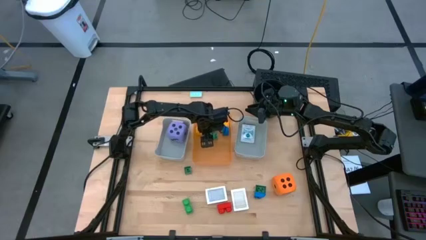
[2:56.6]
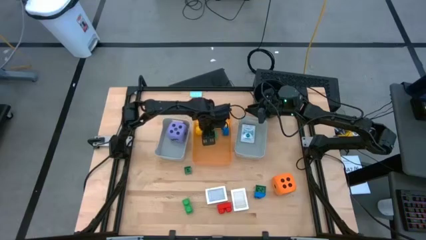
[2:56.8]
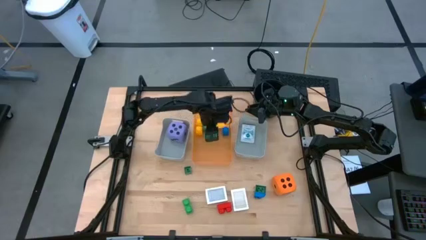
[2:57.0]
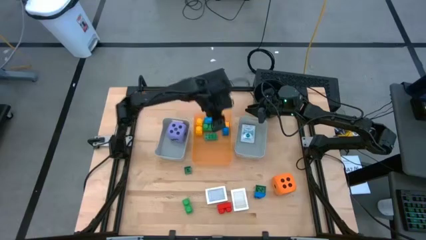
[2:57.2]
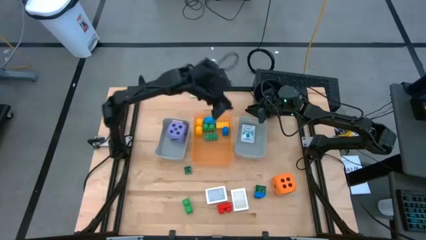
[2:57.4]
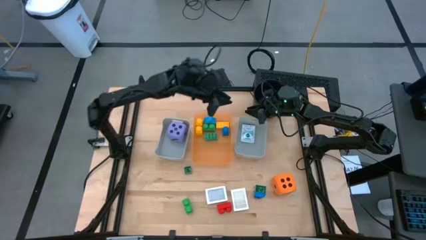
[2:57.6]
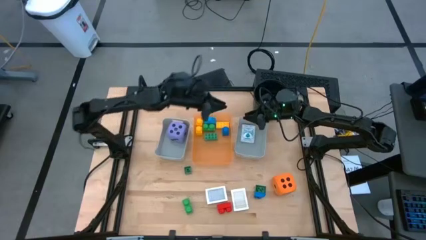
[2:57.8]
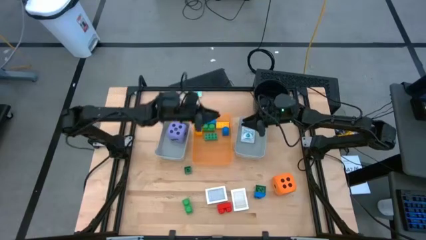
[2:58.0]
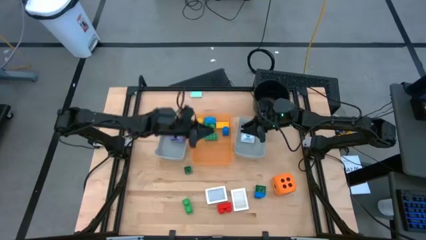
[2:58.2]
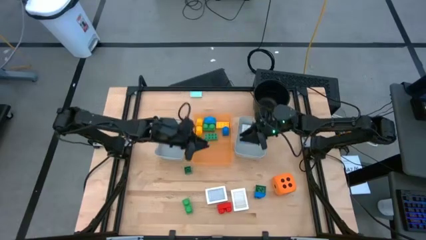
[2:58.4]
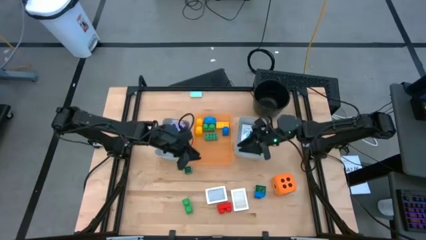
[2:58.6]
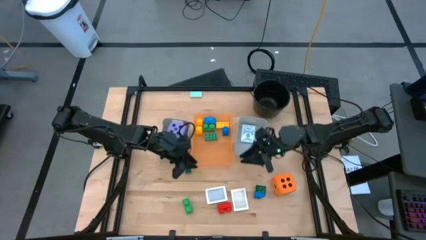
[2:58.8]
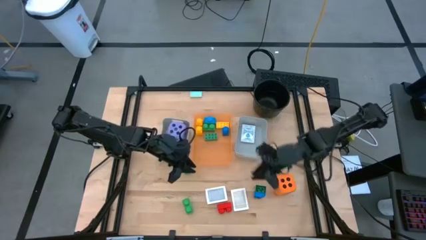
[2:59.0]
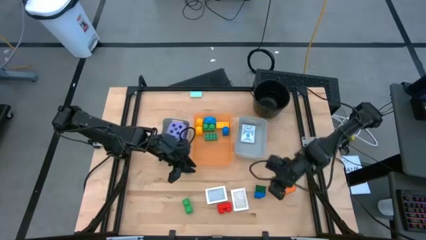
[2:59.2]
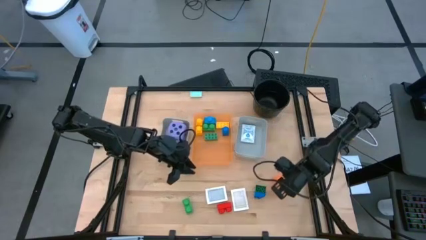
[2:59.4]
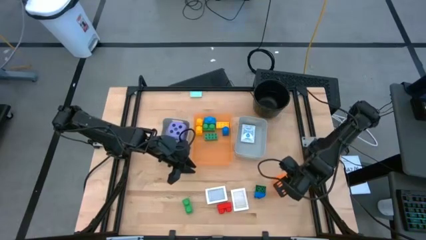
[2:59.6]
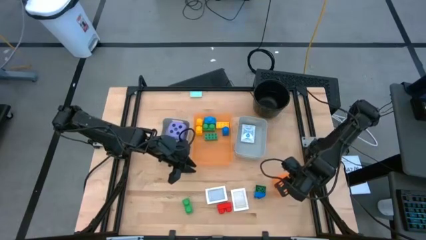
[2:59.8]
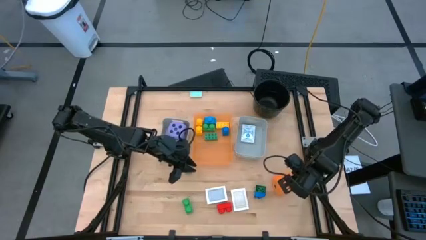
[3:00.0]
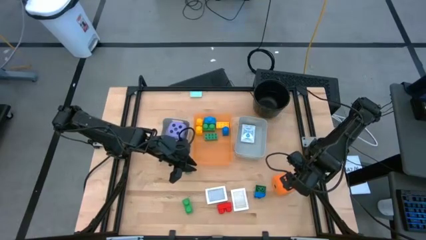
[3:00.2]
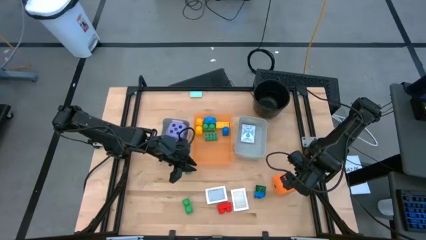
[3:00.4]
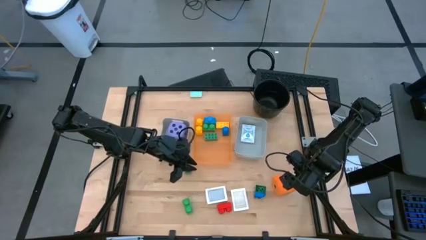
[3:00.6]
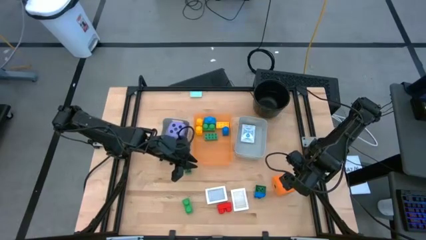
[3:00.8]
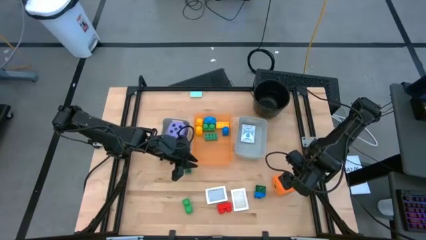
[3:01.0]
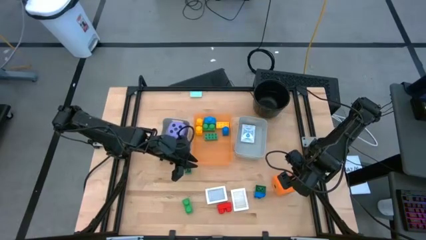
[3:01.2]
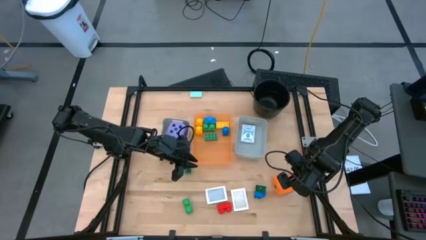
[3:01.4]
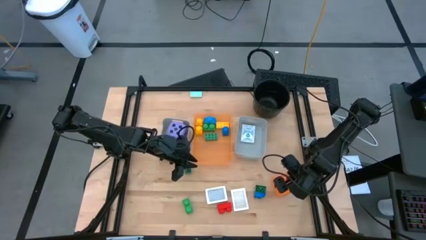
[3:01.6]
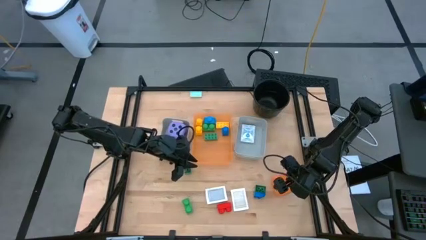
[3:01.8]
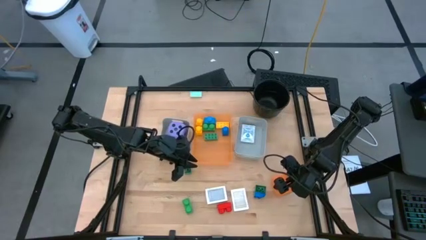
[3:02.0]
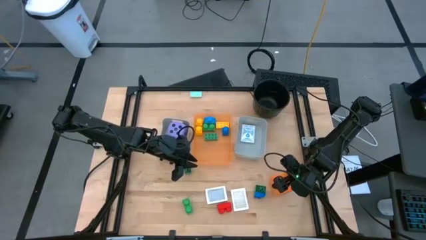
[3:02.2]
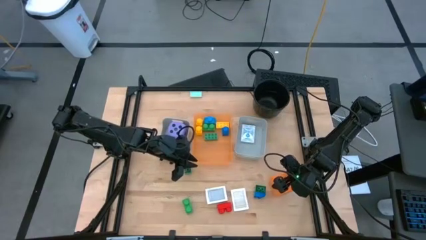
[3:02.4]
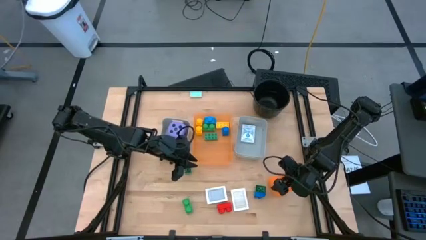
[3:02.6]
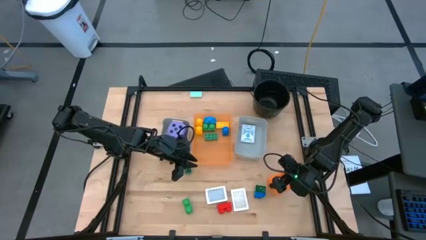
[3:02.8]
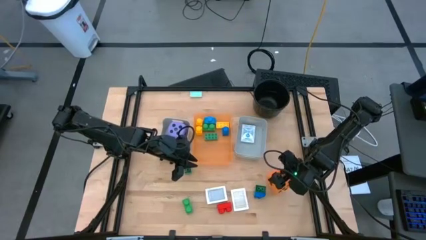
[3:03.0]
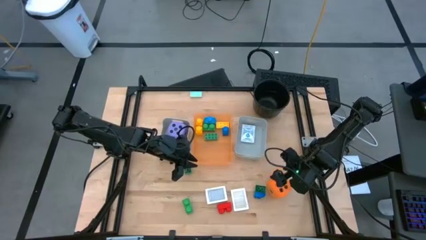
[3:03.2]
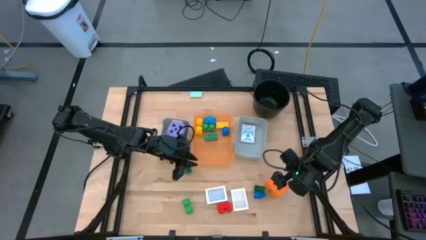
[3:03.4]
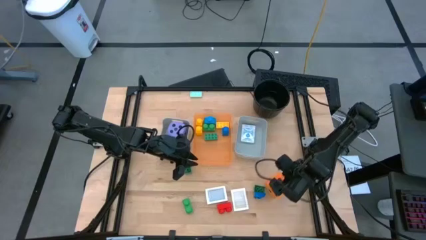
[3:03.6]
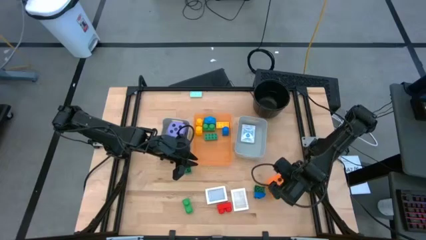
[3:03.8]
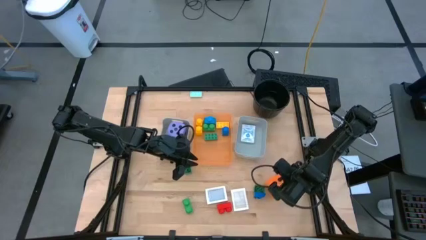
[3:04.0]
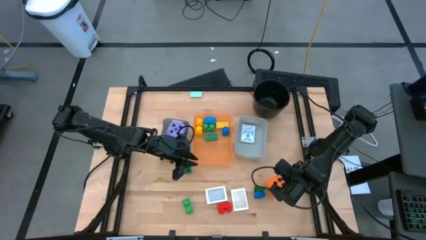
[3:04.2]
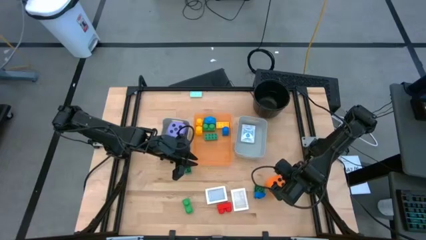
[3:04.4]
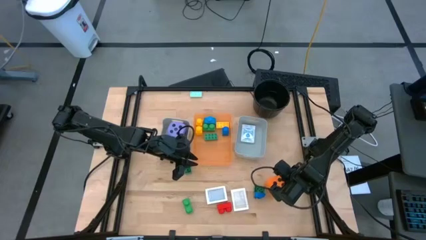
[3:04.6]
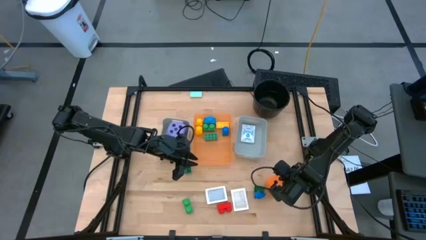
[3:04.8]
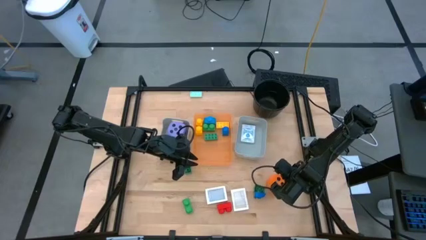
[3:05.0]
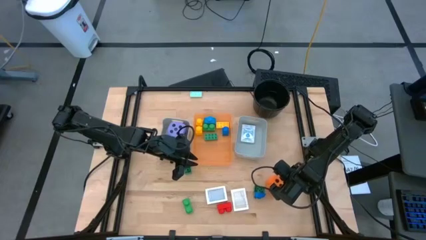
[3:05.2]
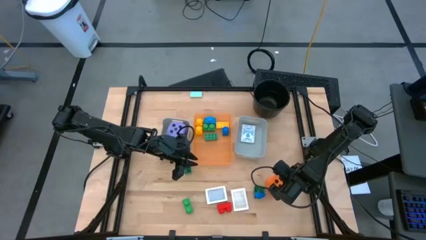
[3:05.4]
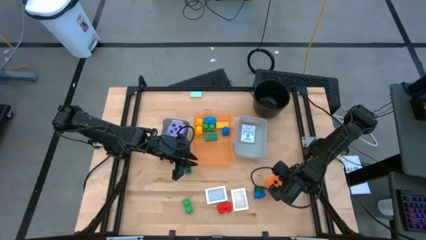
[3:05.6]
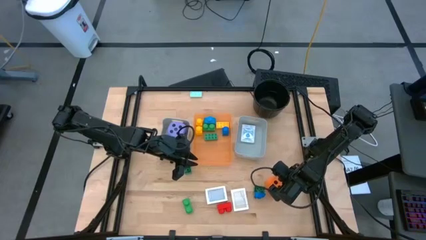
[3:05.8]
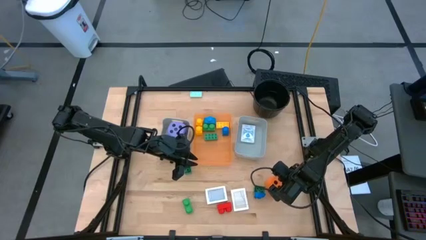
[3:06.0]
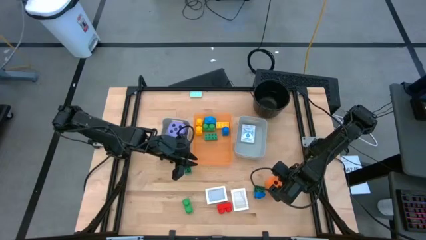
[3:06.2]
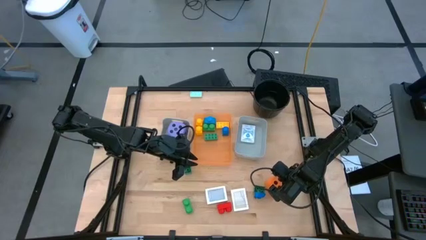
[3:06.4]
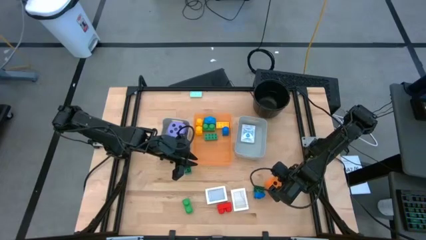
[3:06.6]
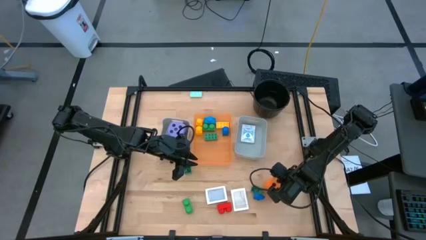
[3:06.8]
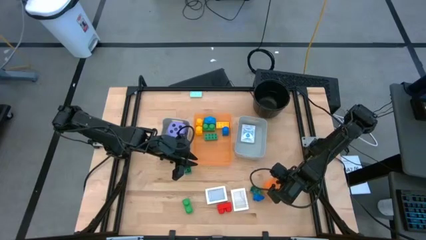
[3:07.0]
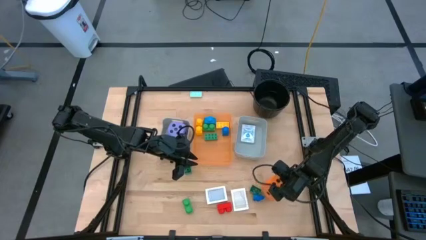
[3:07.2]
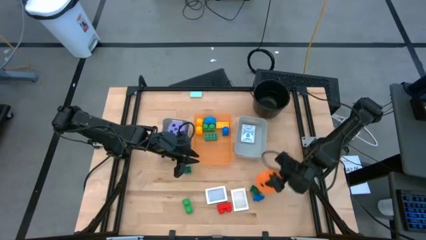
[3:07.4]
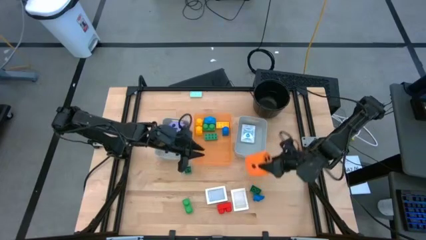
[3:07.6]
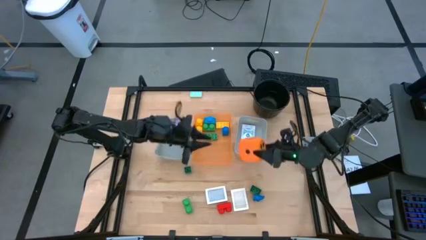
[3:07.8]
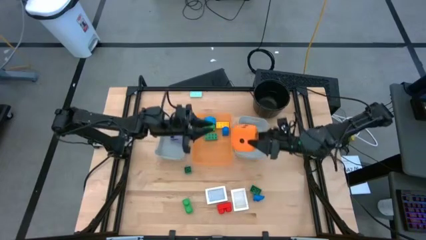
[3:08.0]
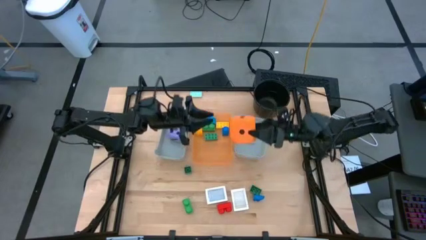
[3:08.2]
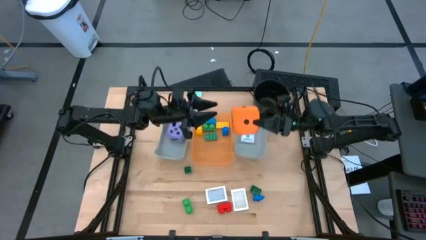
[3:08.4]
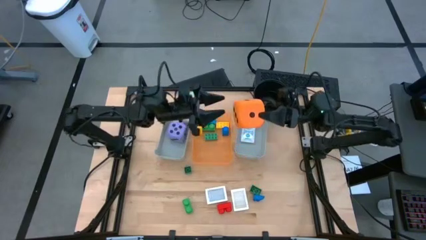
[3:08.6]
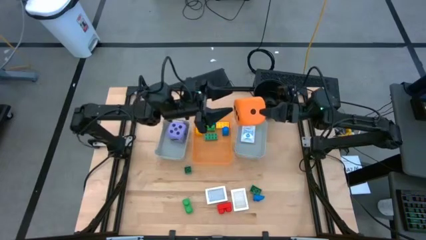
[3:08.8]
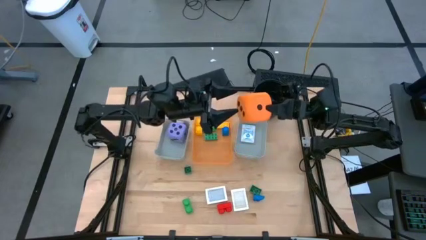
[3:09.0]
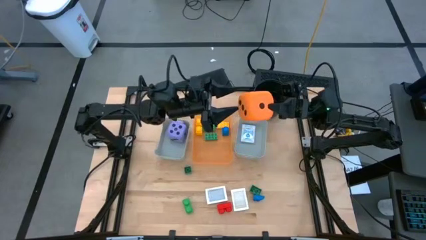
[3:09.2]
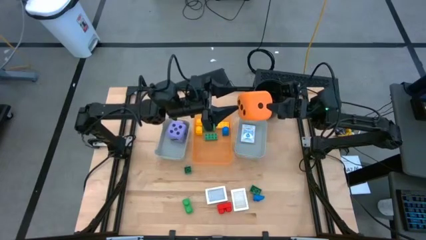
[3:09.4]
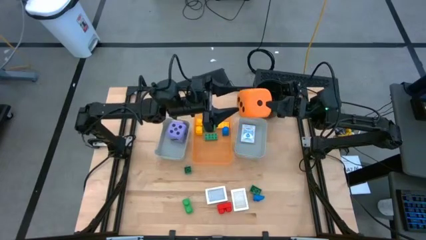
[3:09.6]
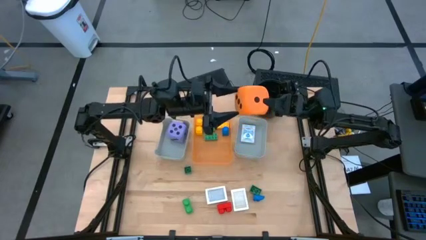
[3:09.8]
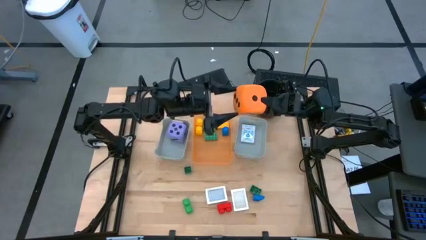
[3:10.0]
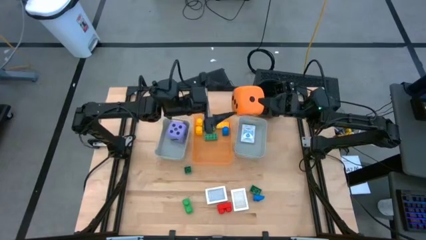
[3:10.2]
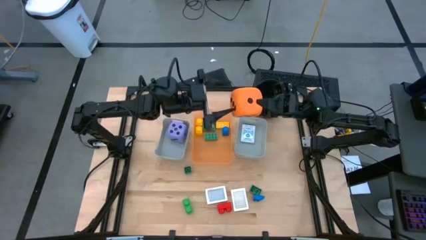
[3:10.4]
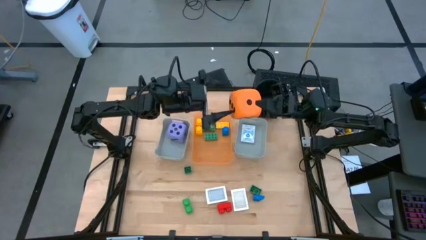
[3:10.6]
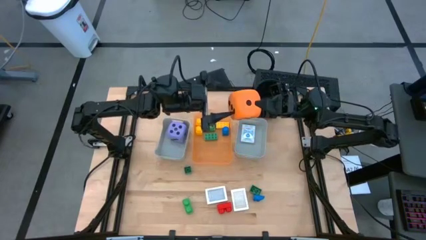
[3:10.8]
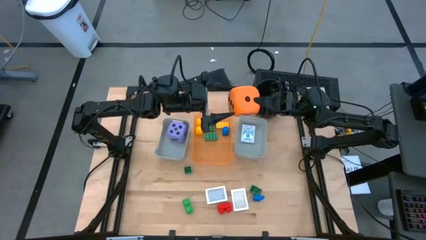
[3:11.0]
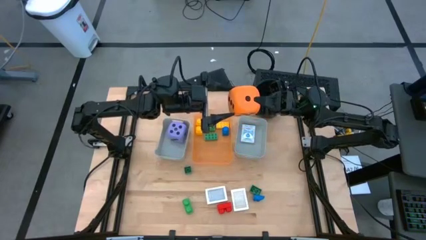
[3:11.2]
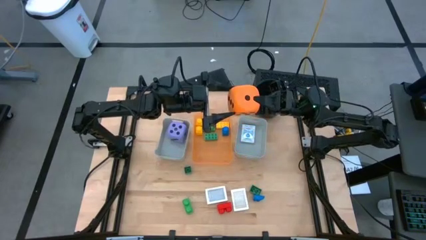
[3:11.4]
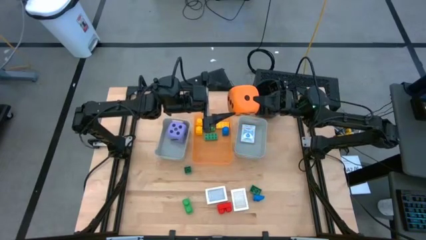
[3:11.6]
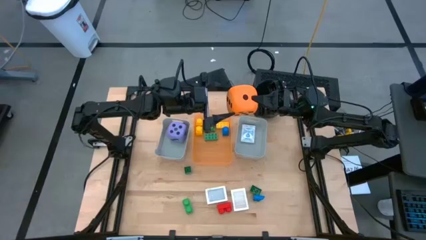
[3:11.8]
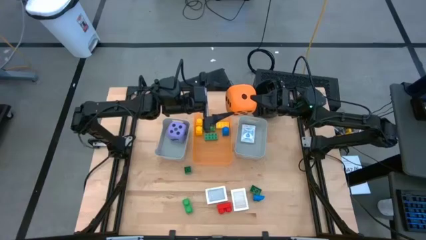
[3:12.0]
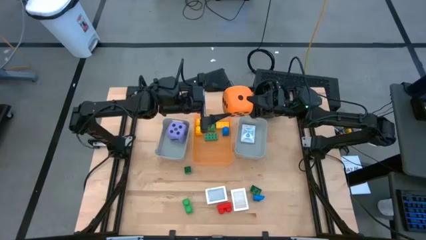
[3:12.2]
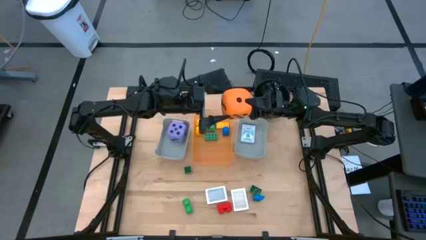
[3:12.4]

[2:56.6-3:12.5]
Task: Pick & Place Toys
Put the orange dice into the left gray bin
